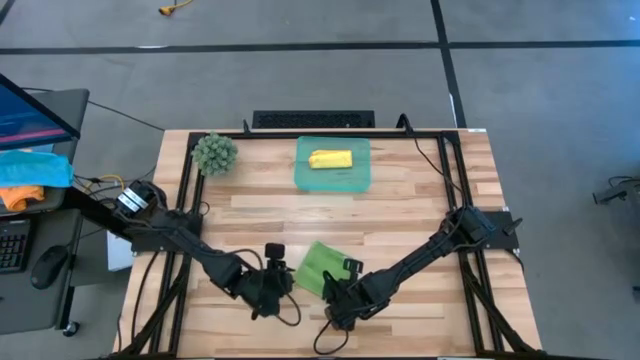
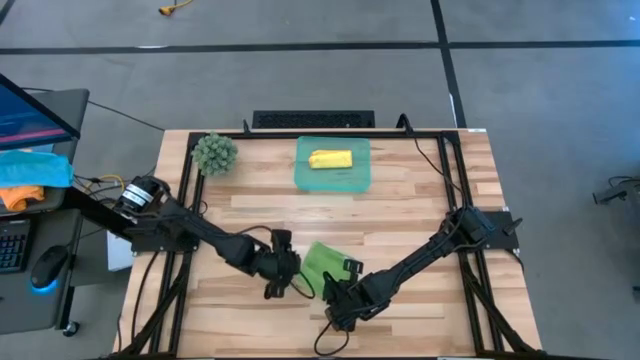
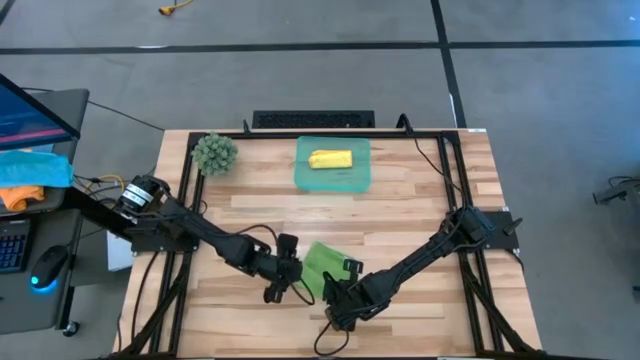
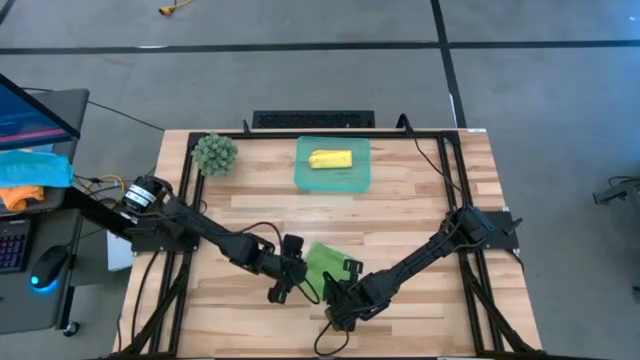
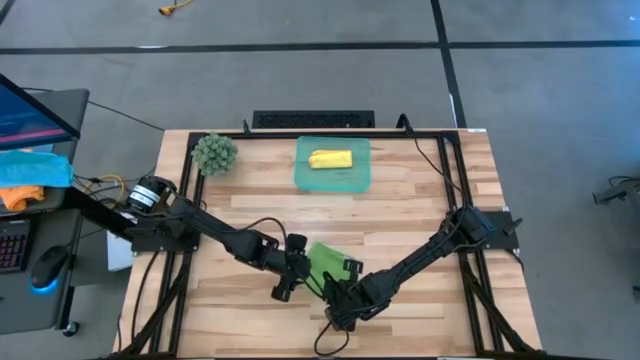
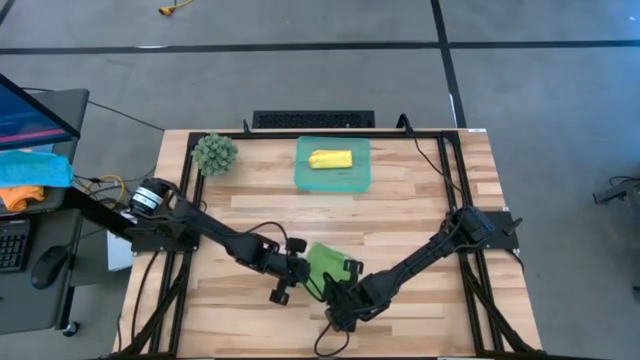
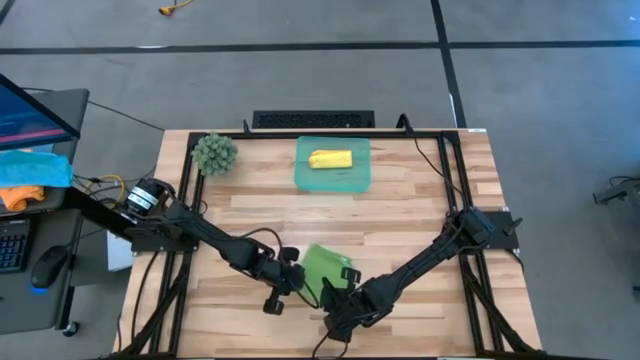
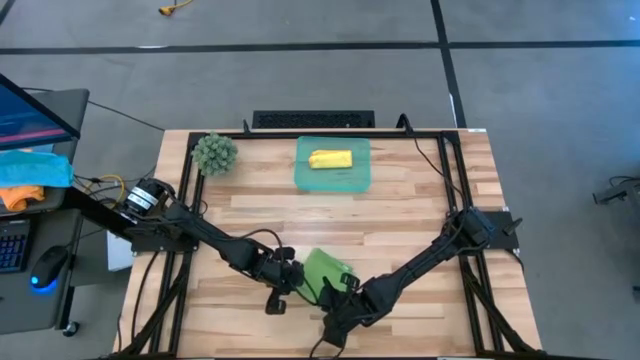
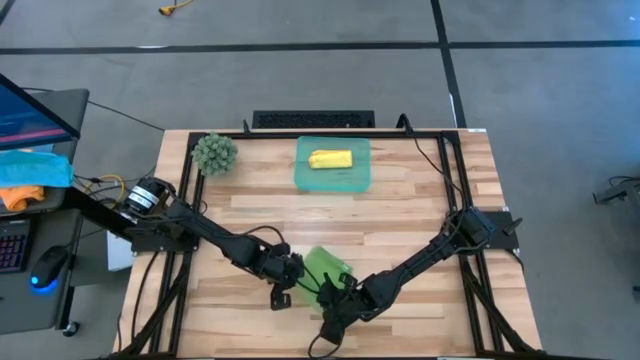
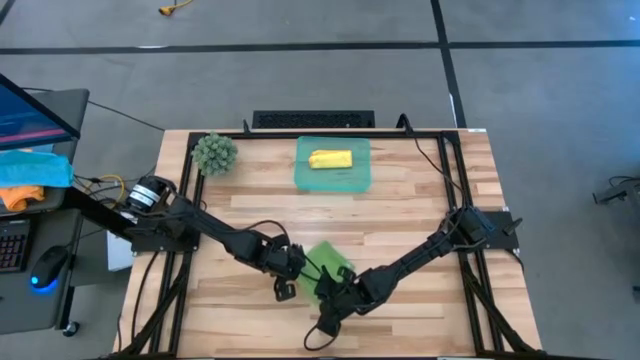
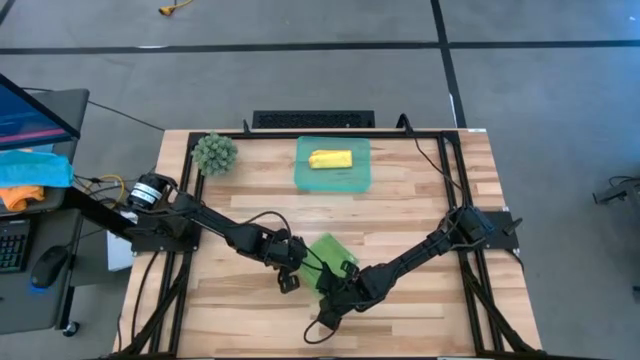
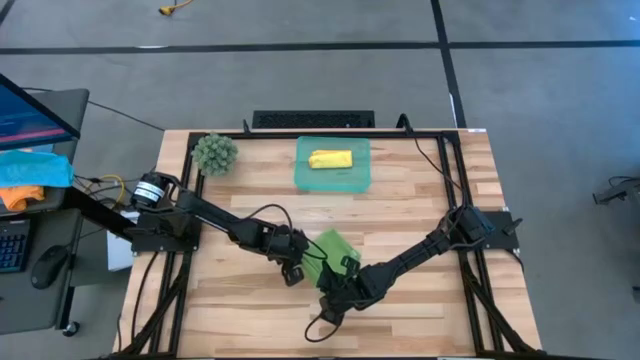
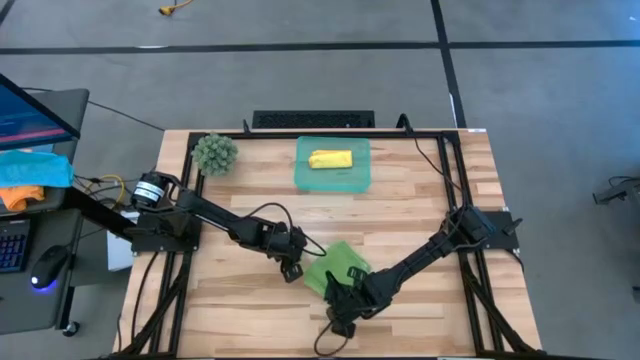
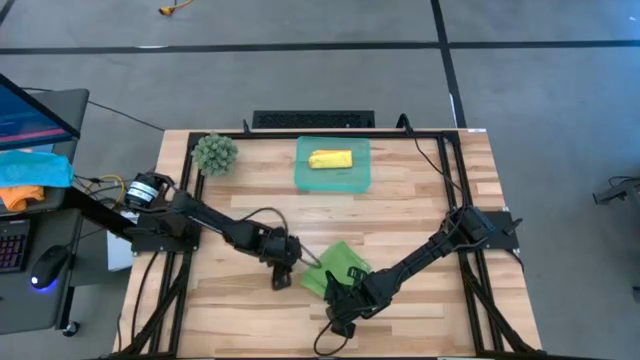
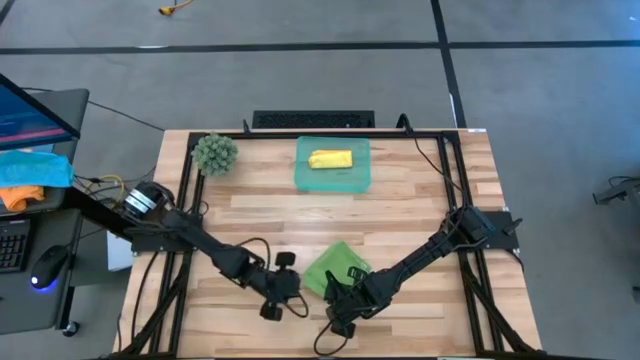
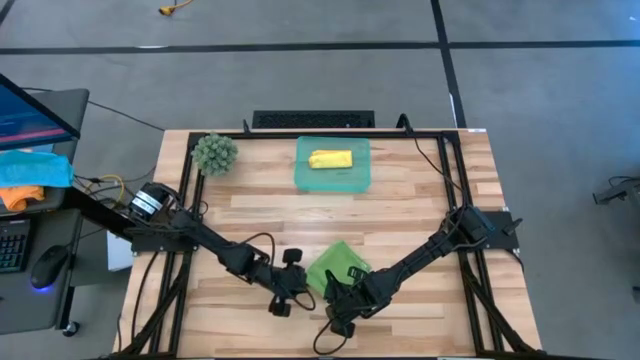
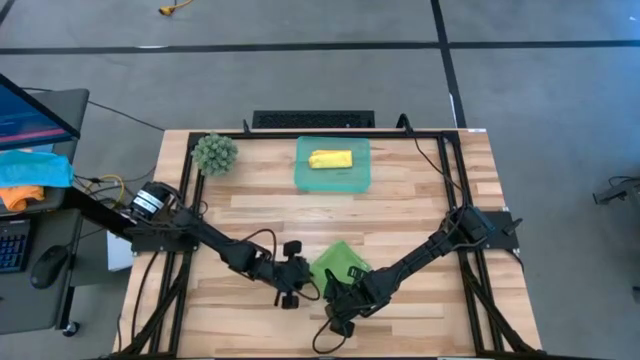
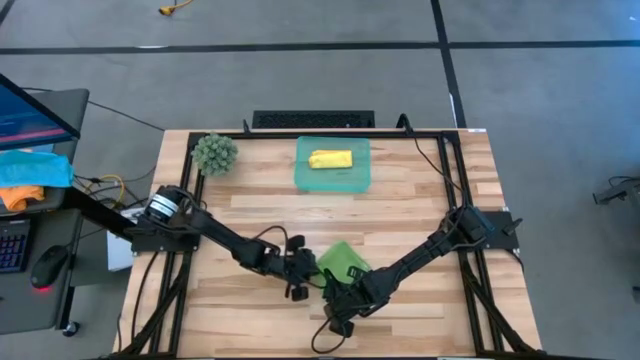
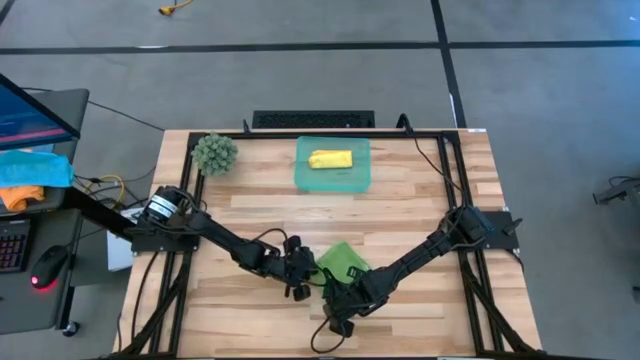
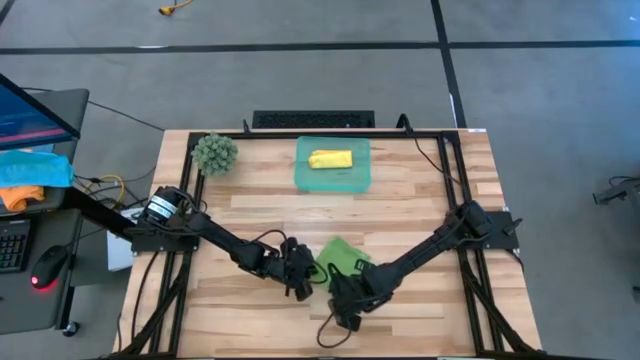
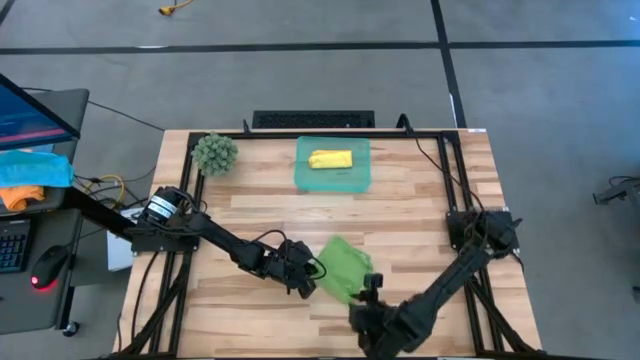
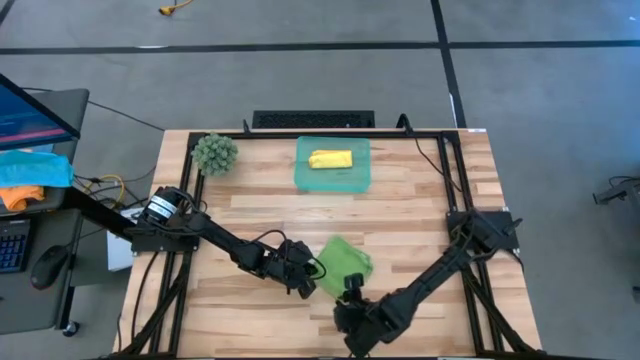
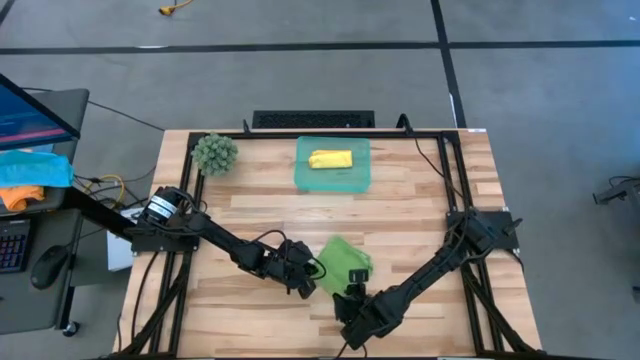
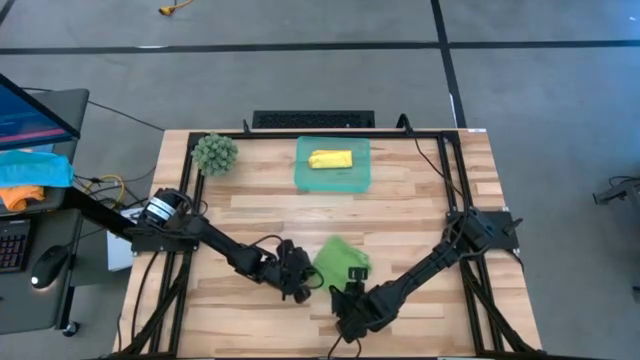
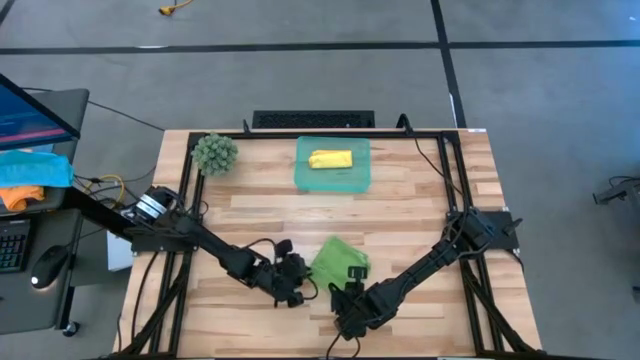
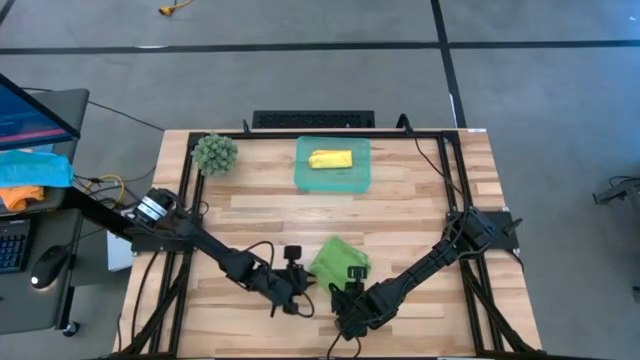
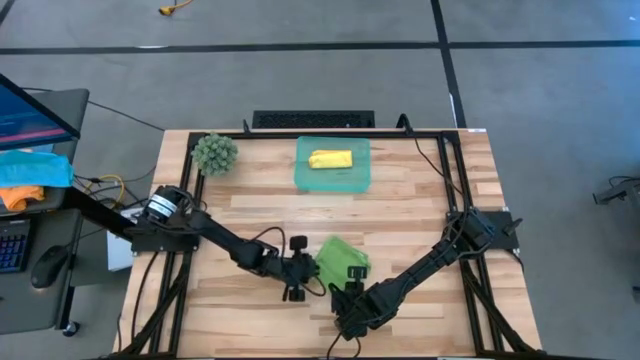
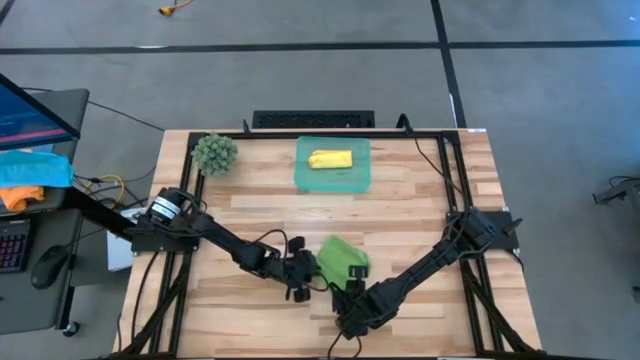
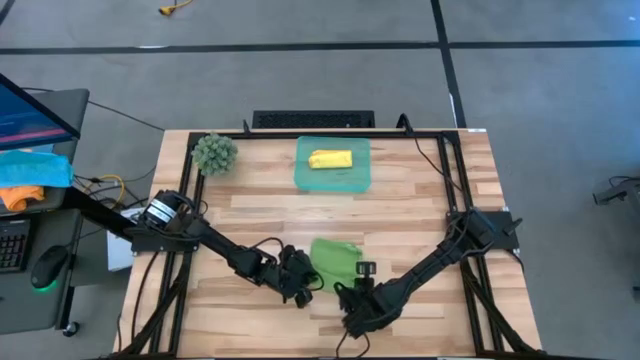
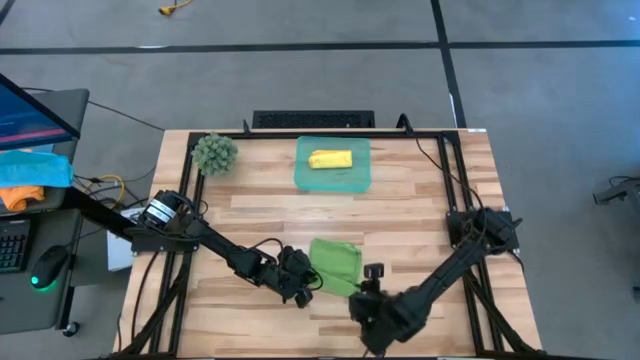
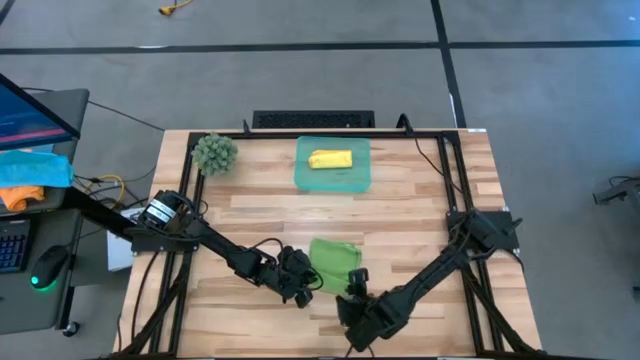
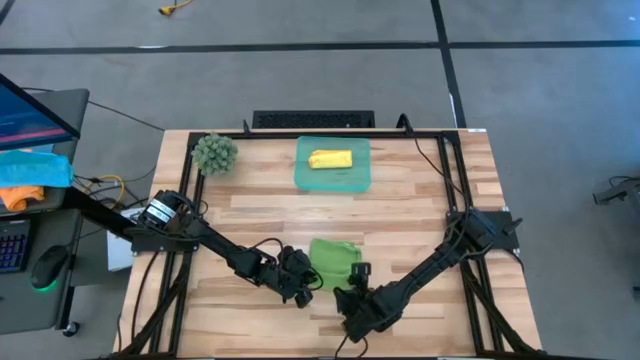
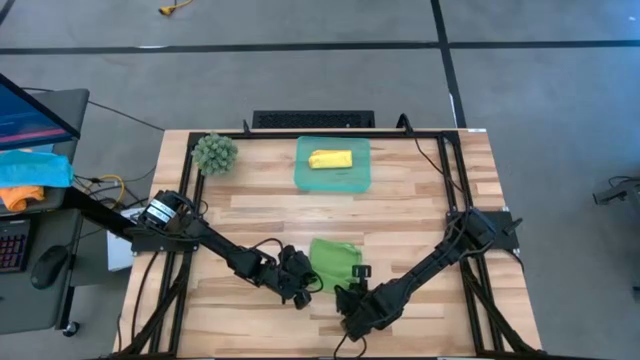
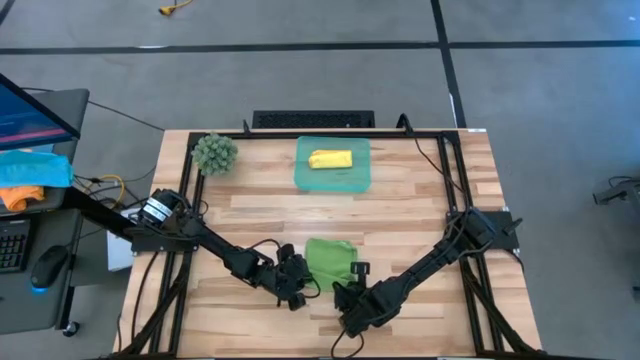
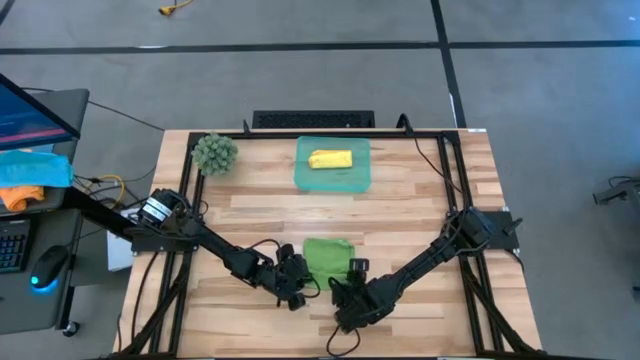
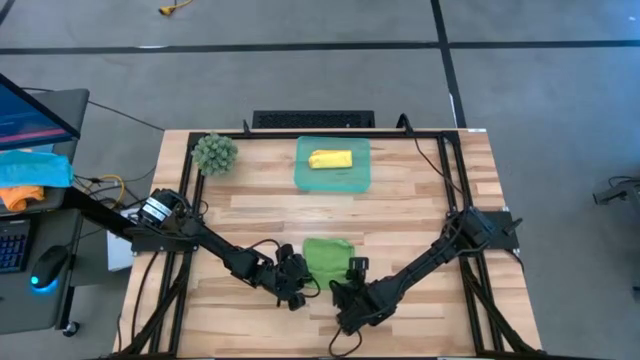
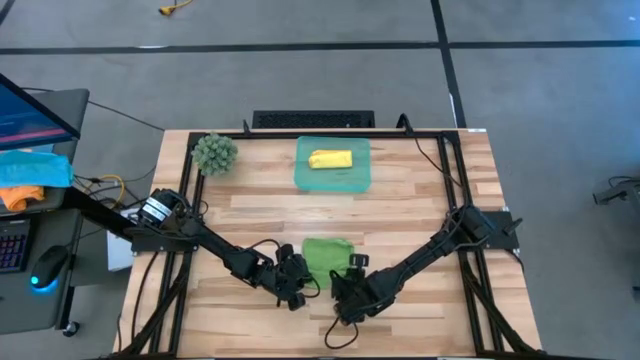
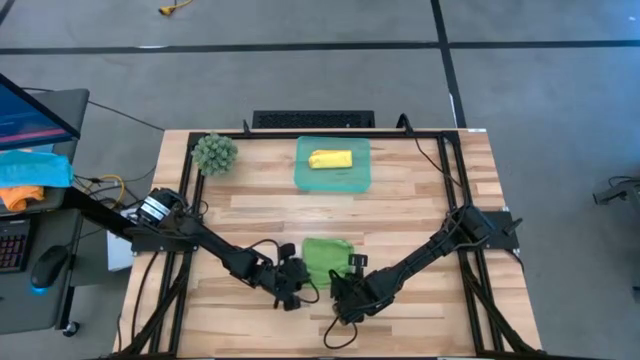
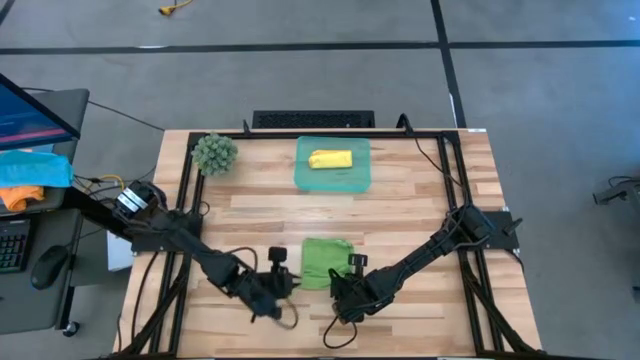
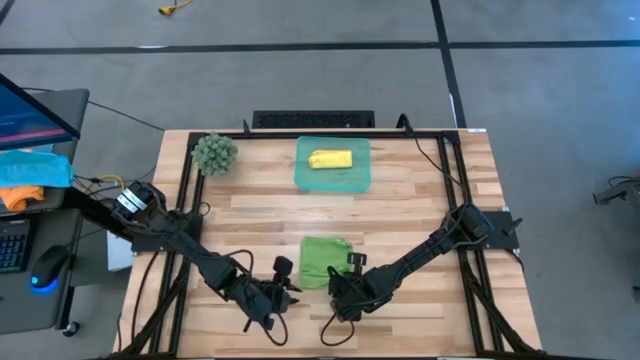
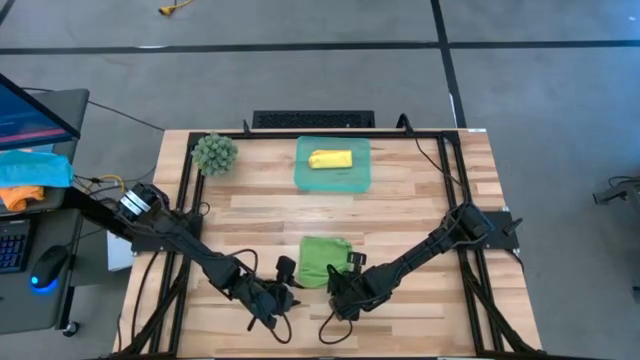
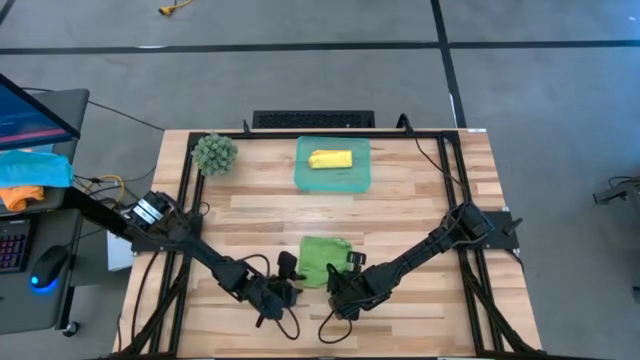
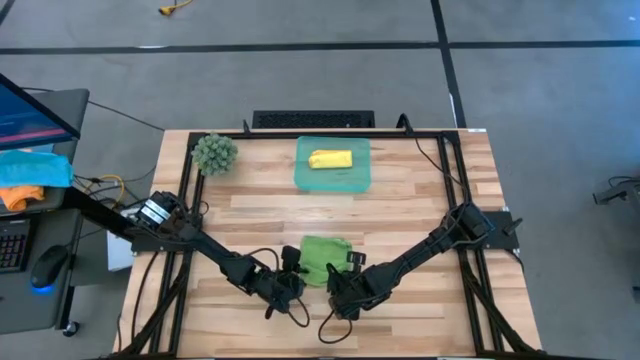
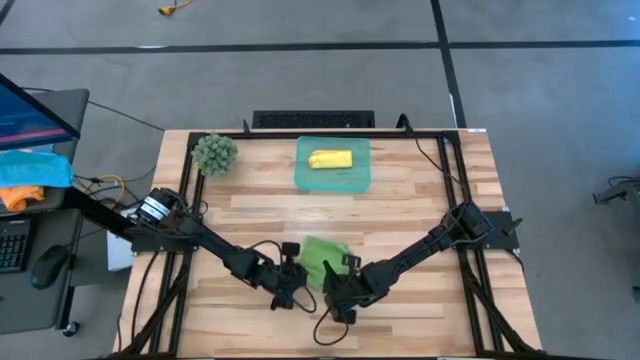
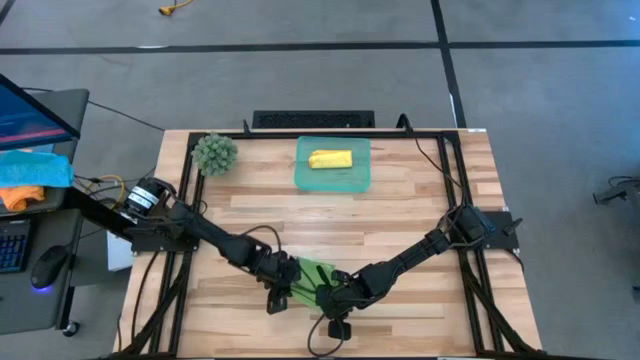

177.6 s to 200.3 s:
Task: Roll microfiber towels into tight, uniform cylinder then place into a basket
Roll the green microfiber cloth
